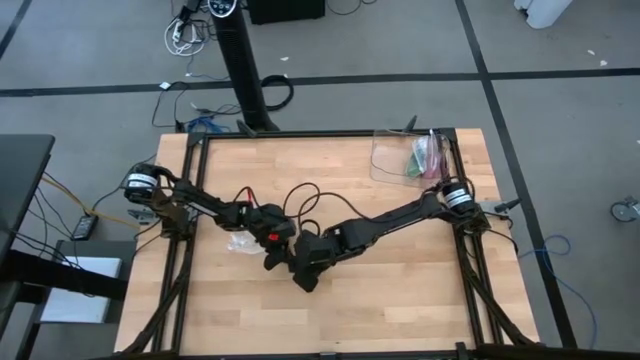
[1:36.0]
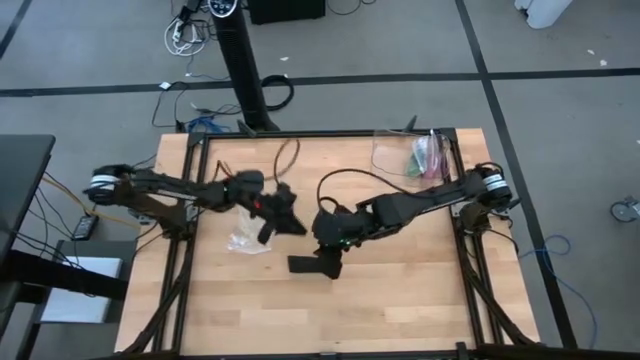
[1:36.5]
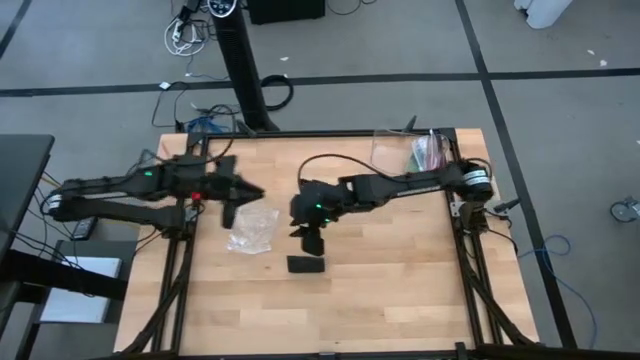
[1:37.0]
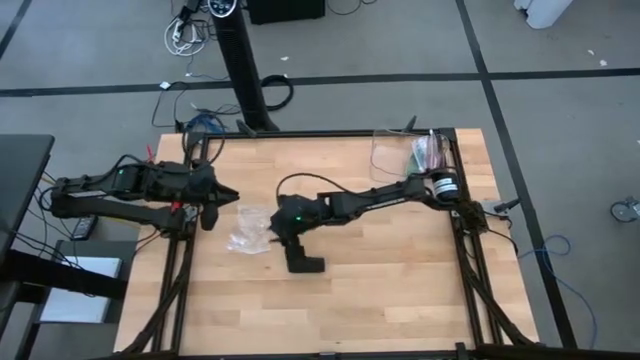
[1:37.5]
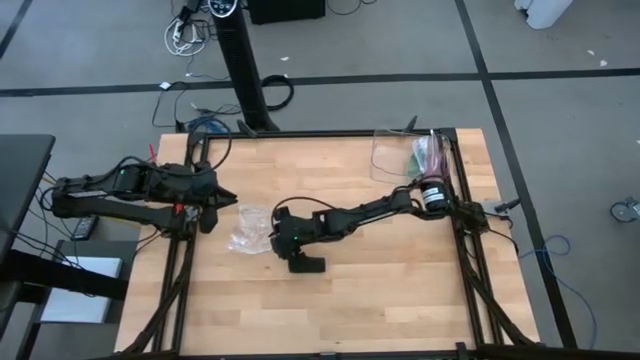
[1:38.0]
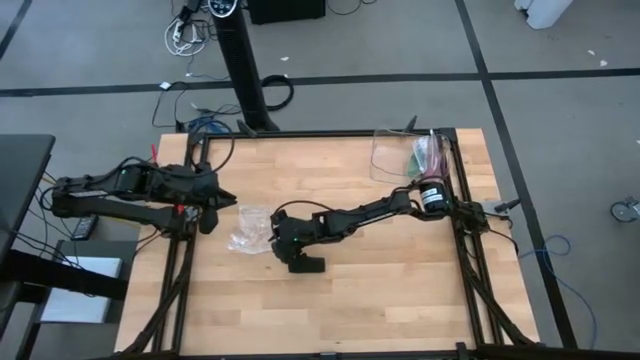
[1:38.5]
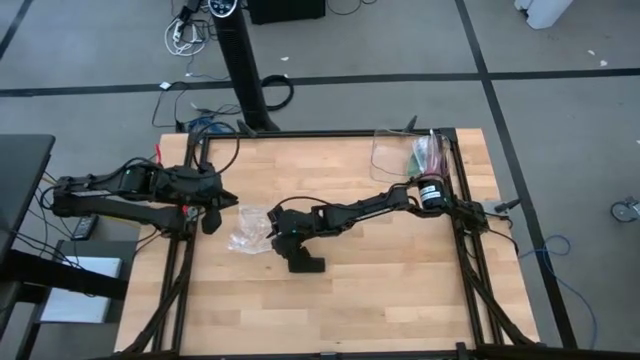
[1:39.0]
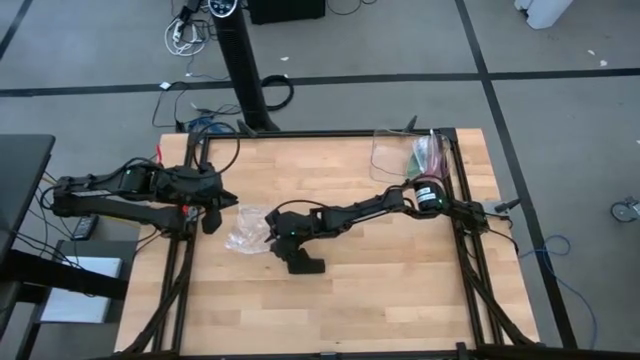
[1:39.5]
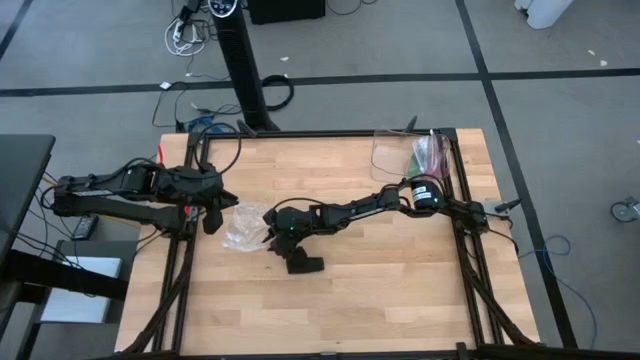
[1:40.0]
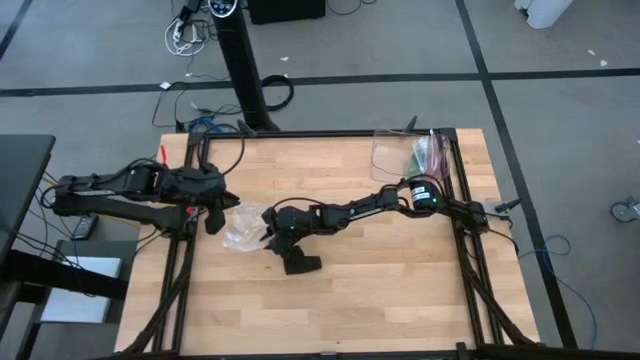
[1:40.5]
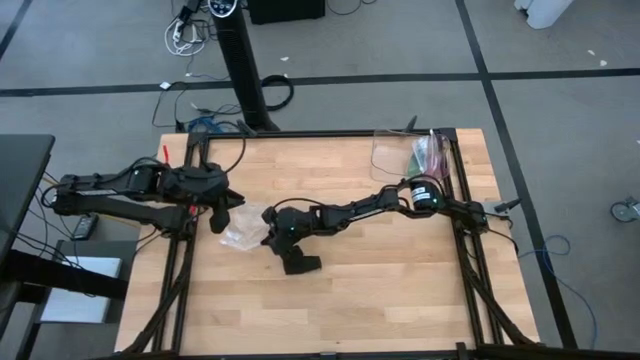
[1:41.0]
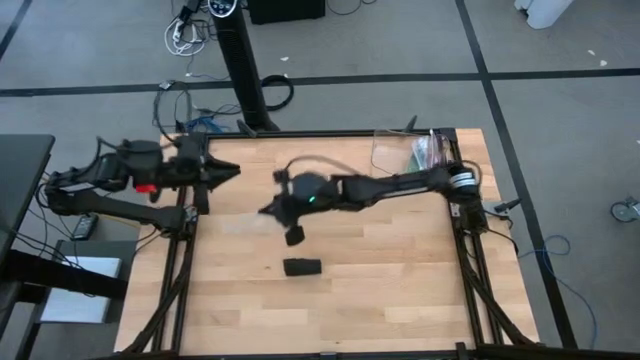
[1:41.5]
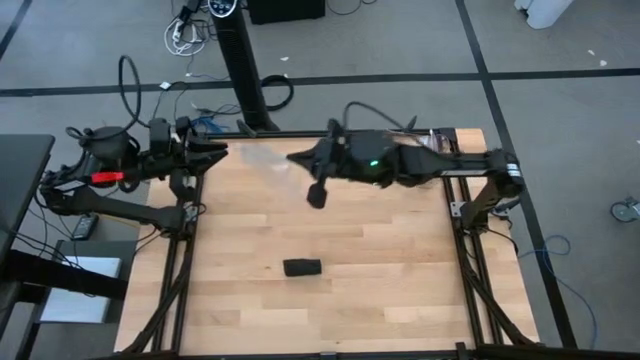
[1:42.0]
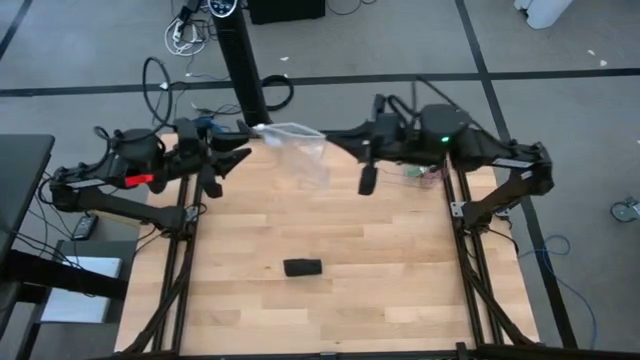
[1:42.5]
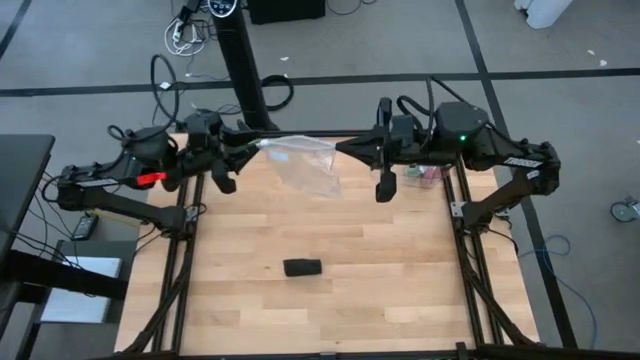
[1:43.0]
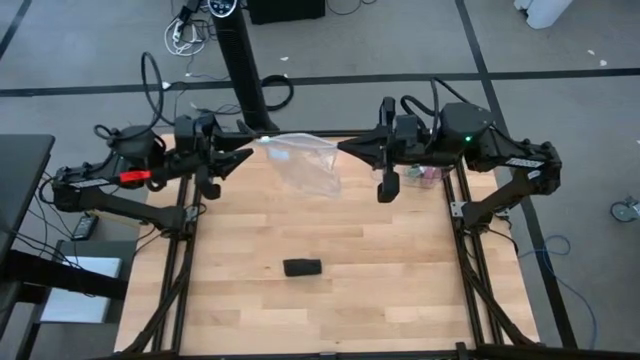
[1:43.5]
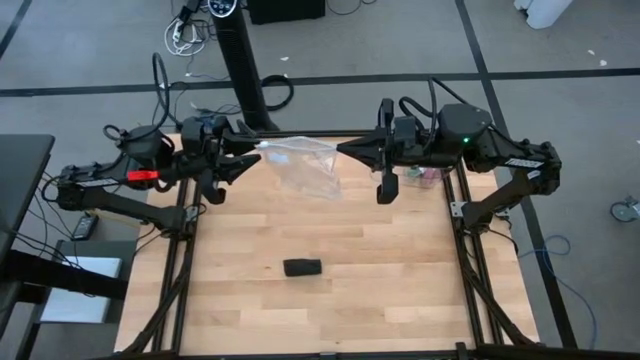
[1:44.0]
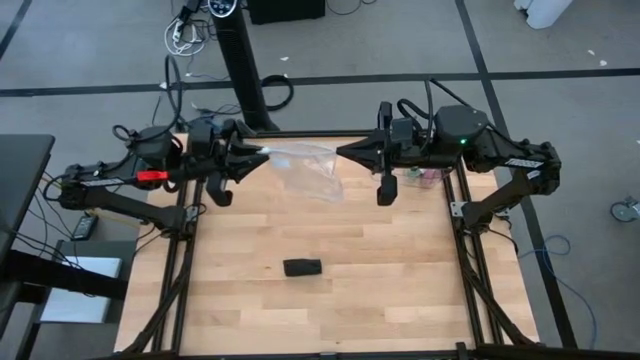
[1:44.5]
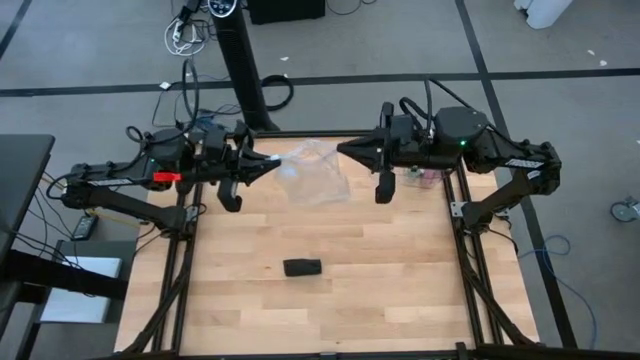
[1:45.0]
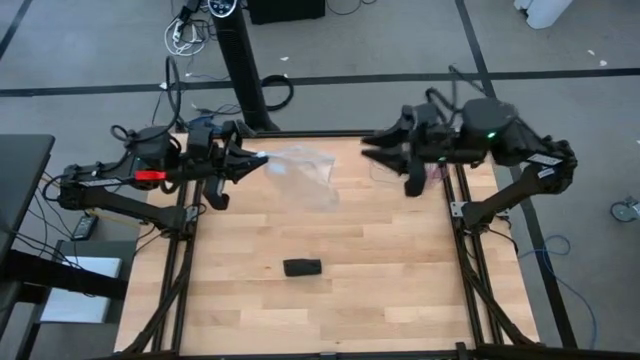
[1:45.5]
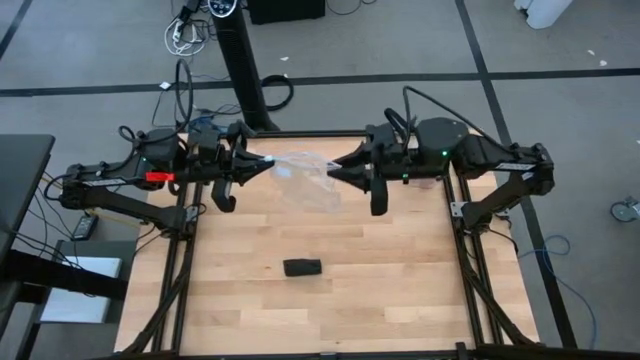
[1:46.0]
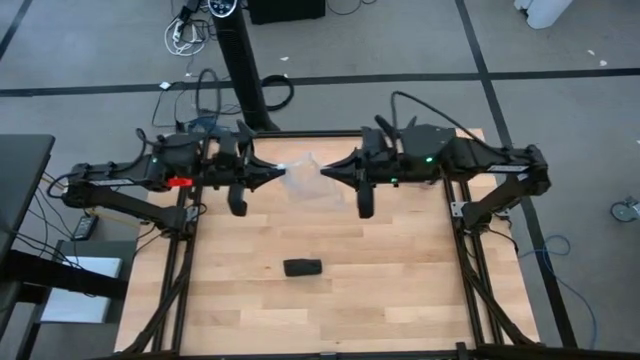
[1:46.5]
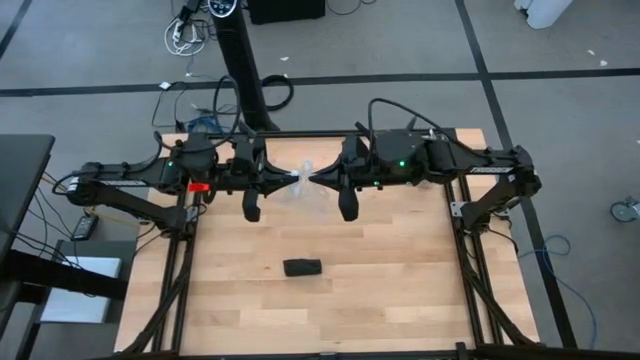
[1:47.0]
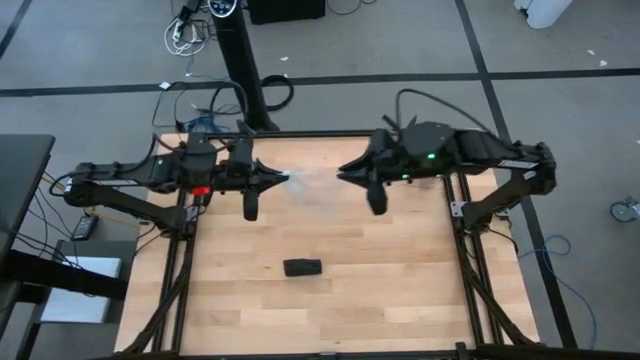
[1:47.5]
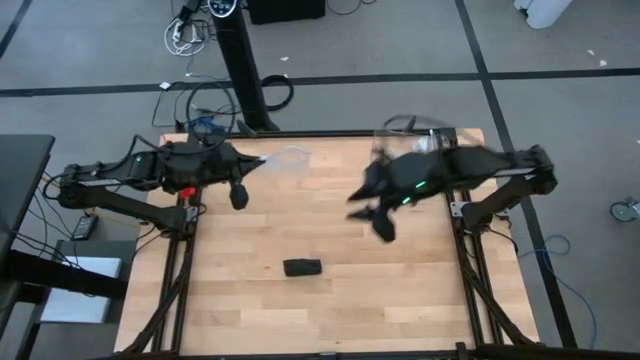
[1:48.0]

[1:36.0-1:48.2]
Task: Roll bandage
Put the black bandage into the transparent ziplock bag

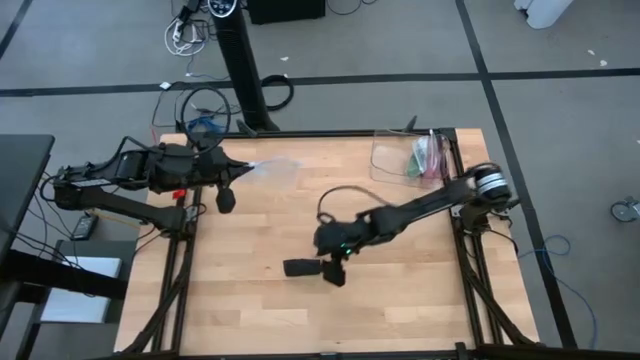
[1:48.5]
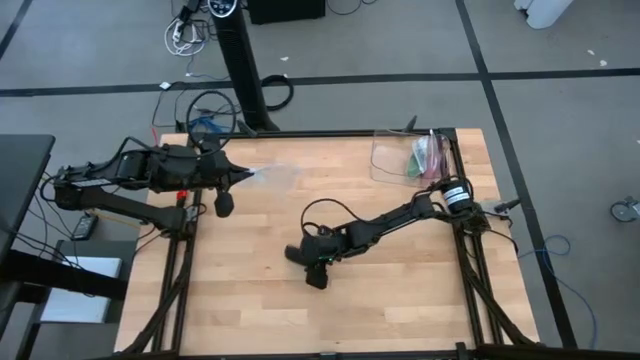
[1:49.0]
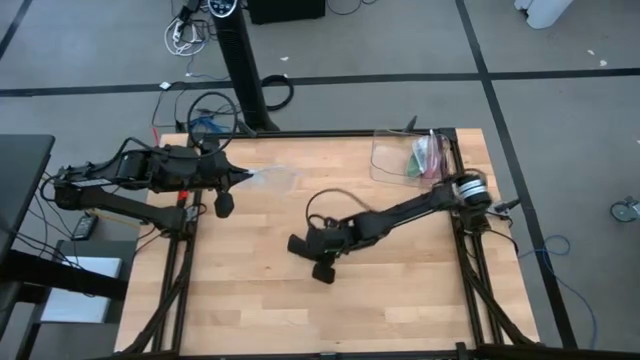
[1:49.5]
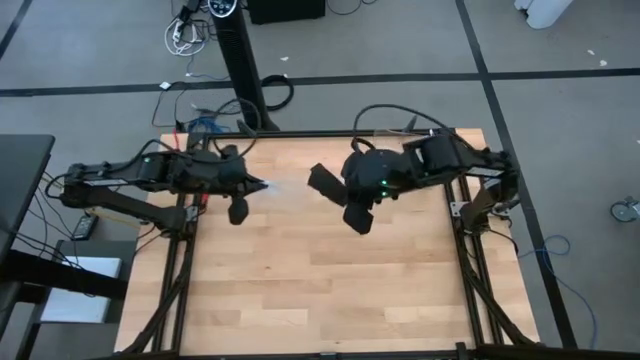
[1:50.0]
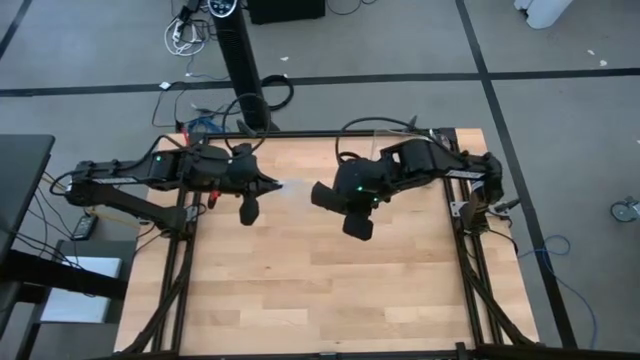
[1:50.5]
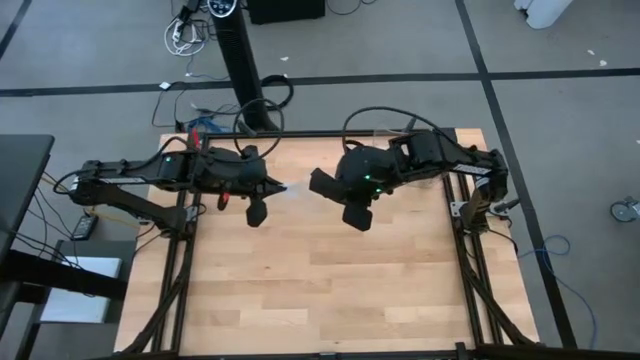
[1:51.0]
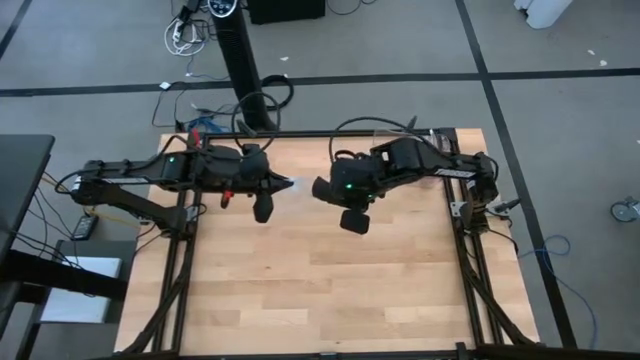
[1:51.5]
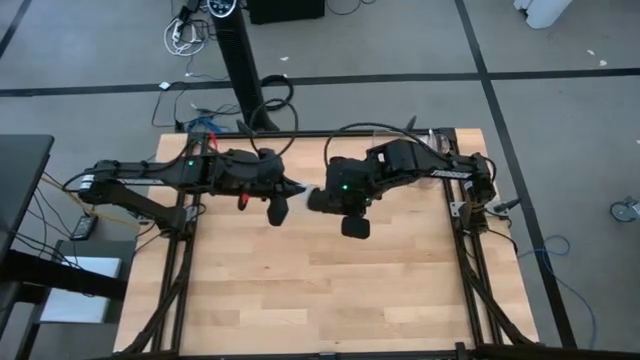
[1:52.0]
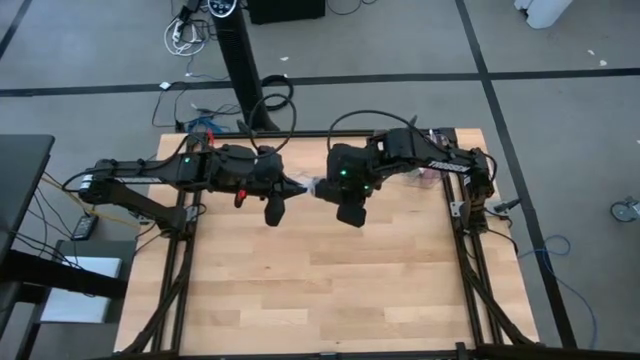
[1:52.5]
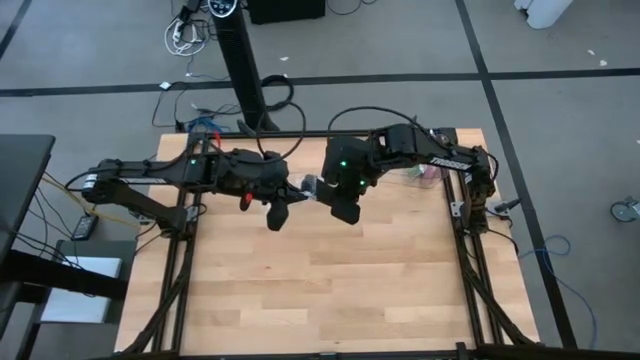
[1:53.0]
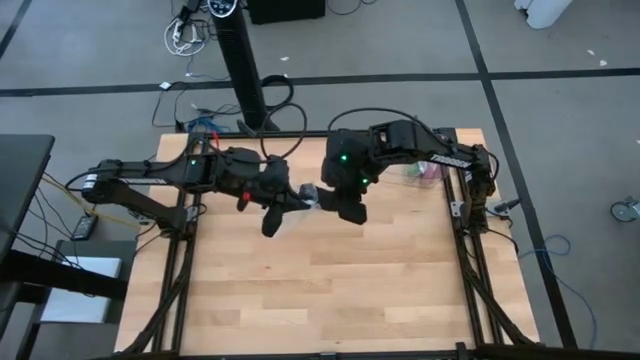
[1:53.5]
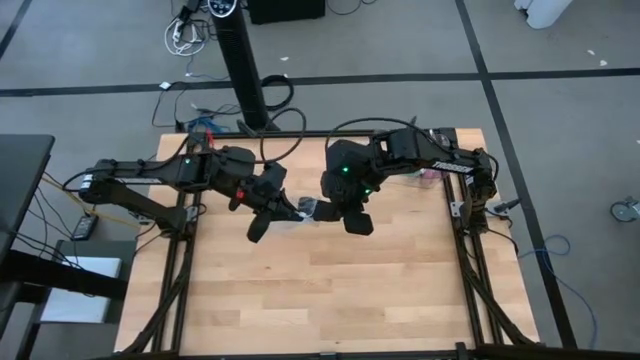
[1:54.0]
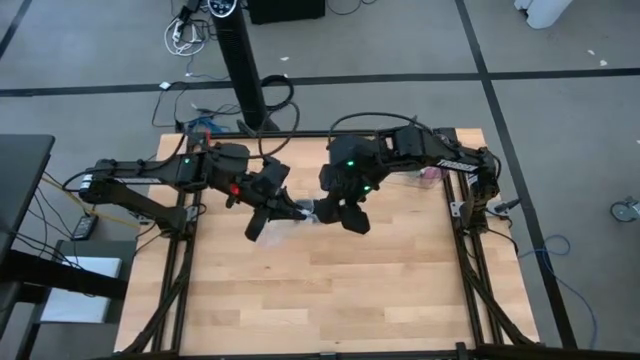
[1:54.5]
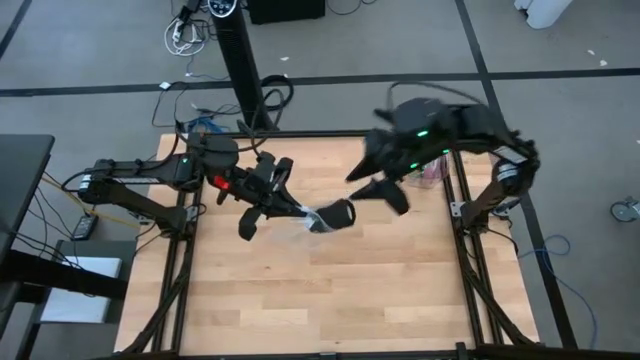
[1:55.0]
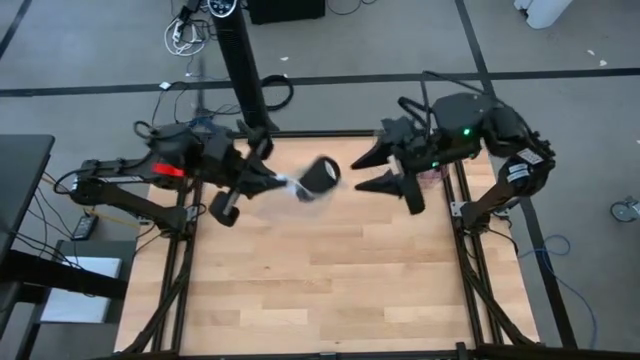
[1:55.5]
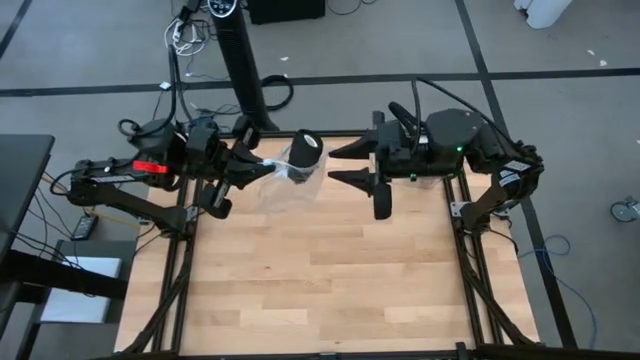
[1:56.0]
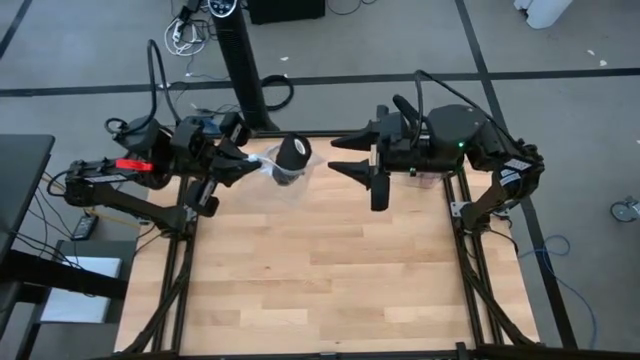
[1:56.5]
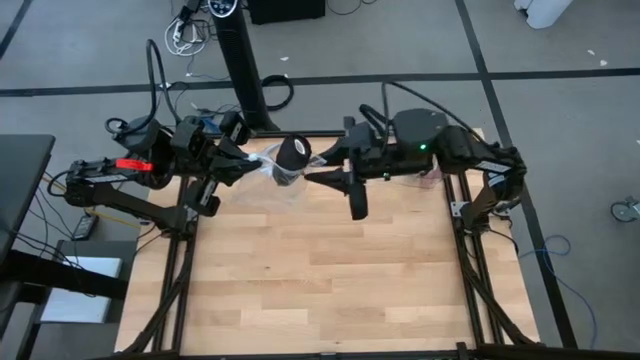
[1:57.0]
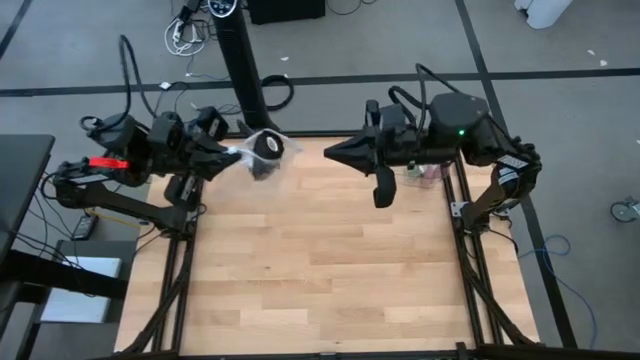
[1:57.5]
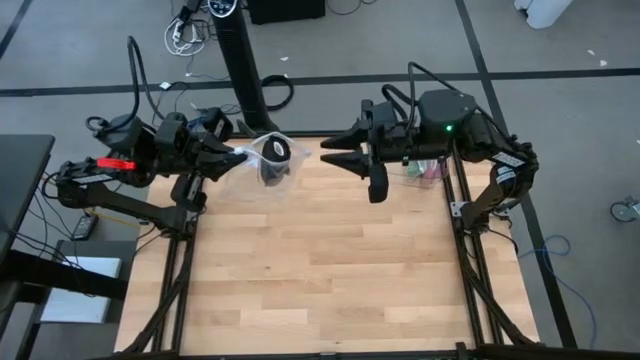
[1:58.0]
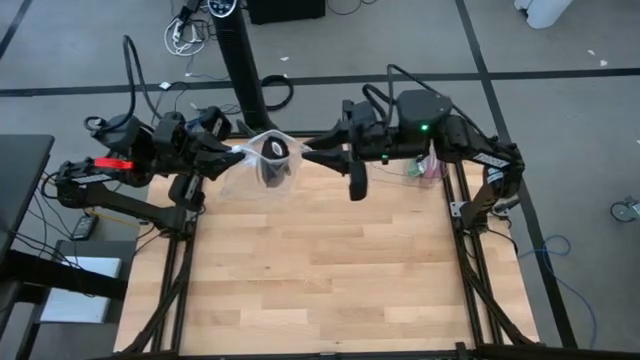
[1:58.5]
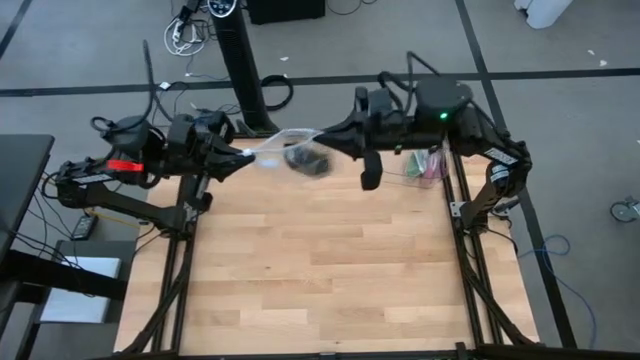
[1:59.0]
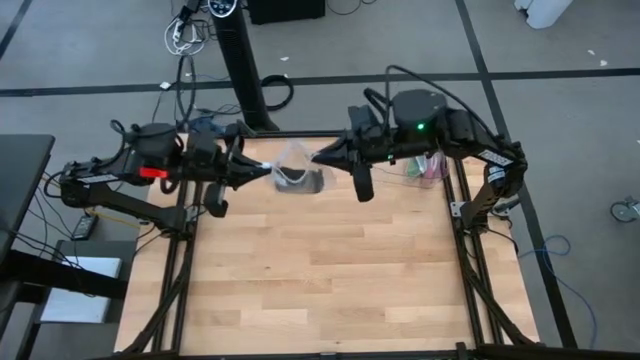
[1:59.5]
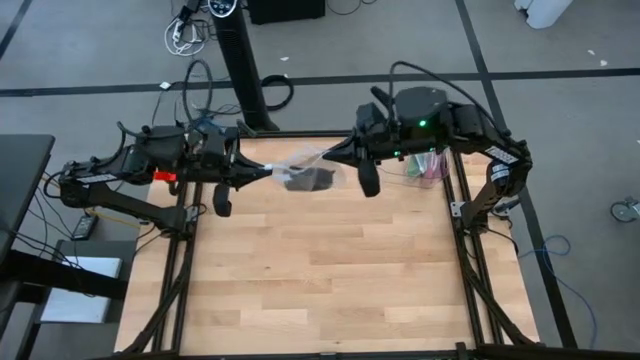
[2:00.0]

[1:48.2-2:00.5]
Put the black bandage into the transparent ziplock bag
